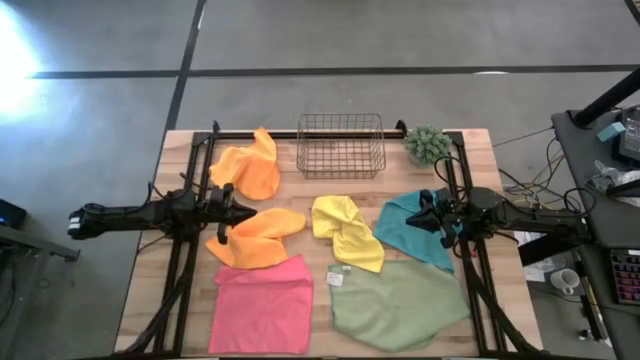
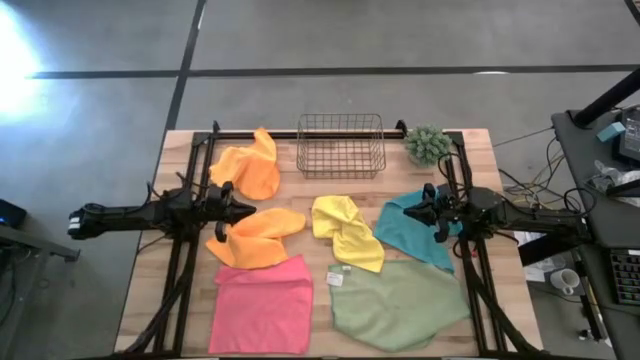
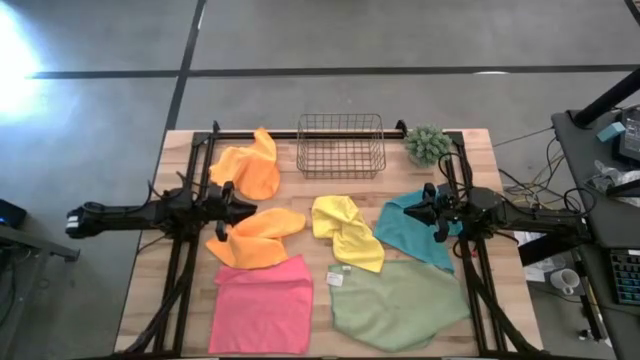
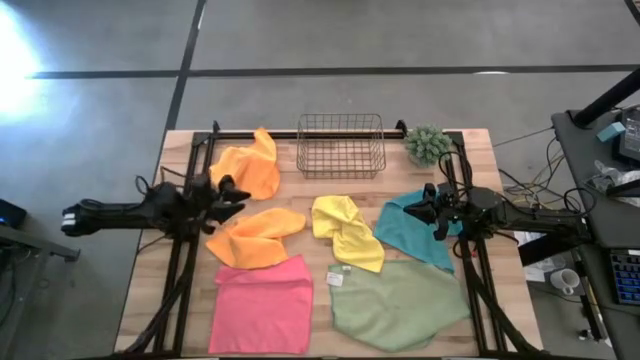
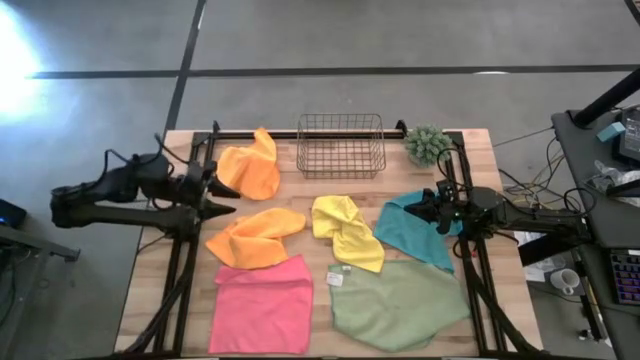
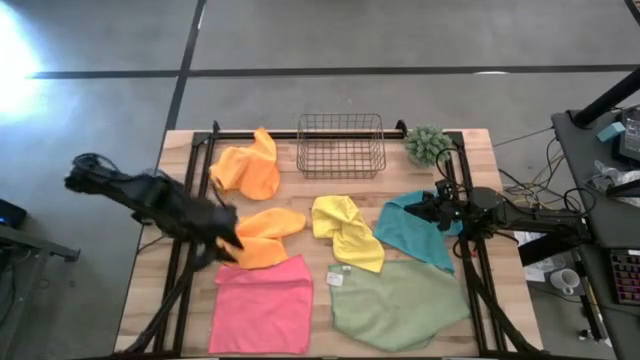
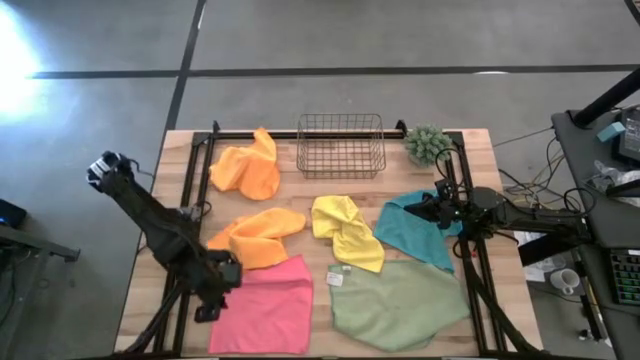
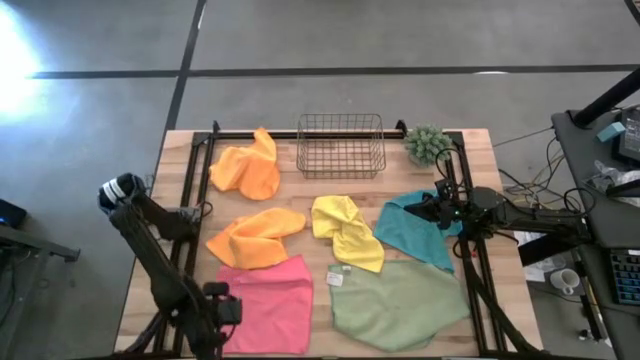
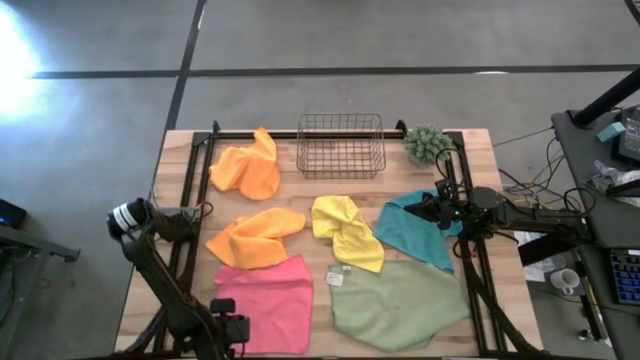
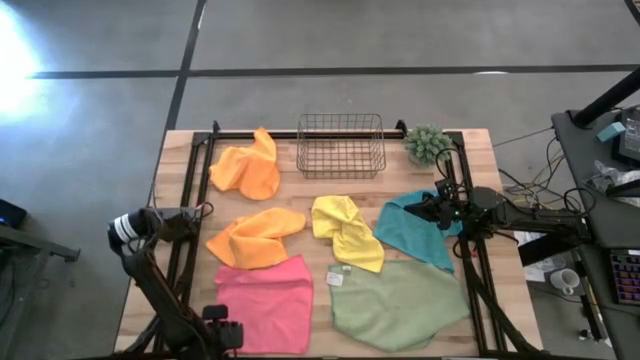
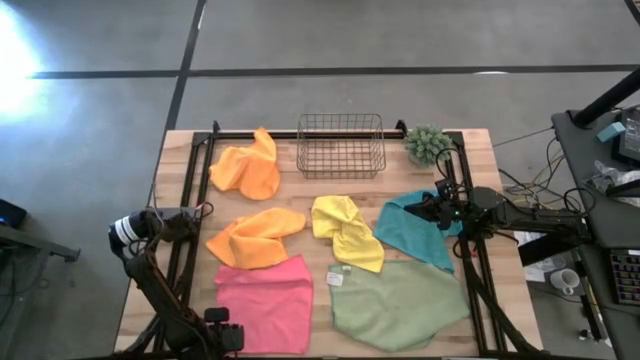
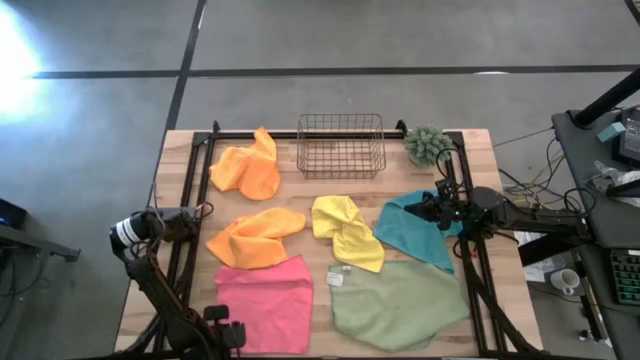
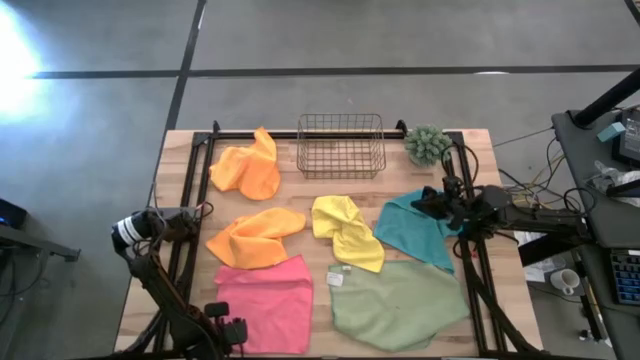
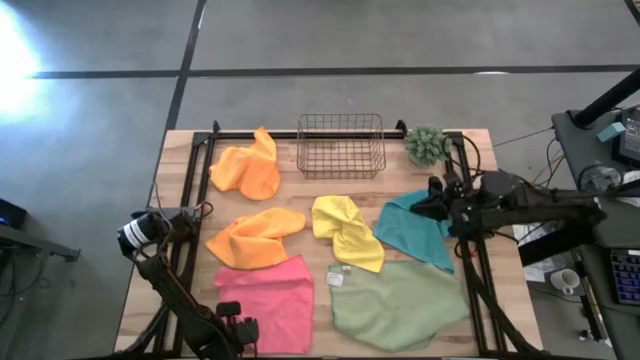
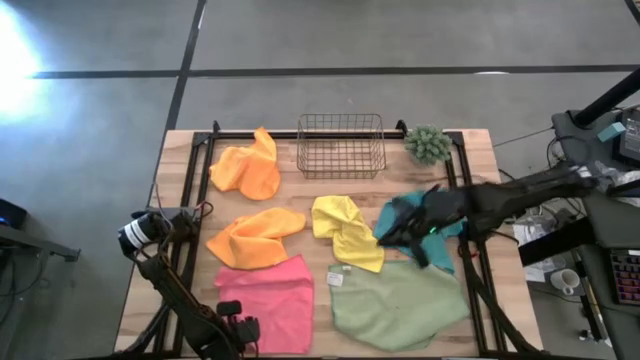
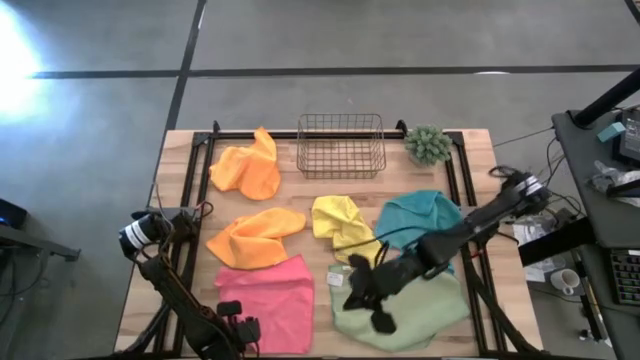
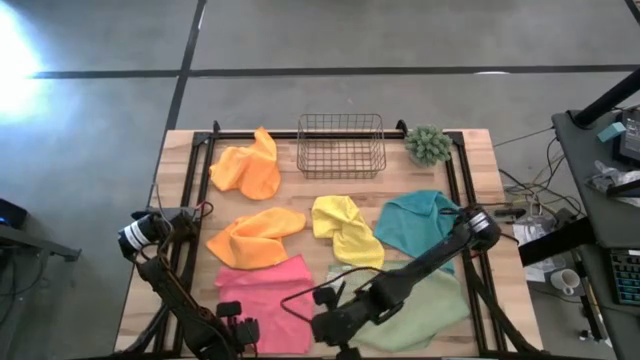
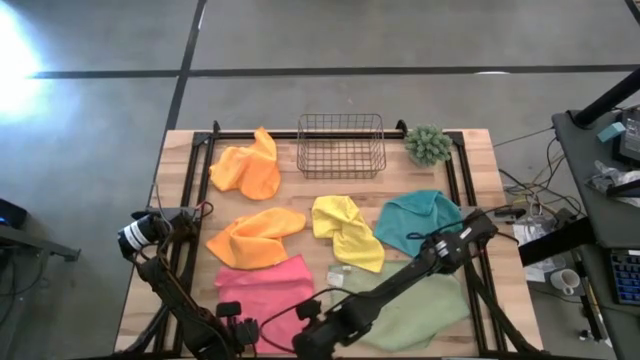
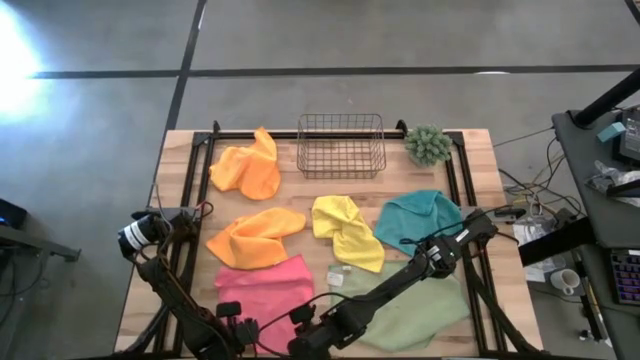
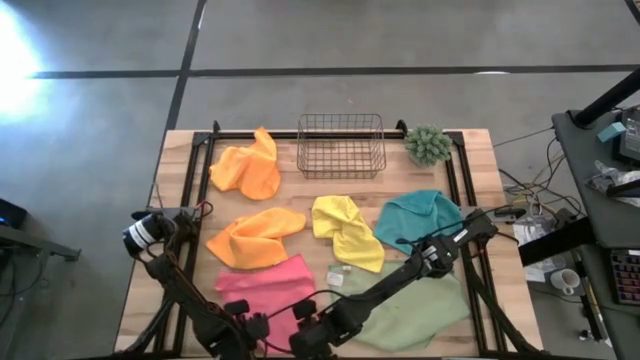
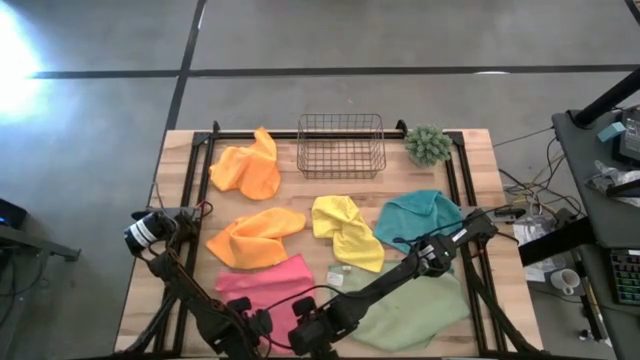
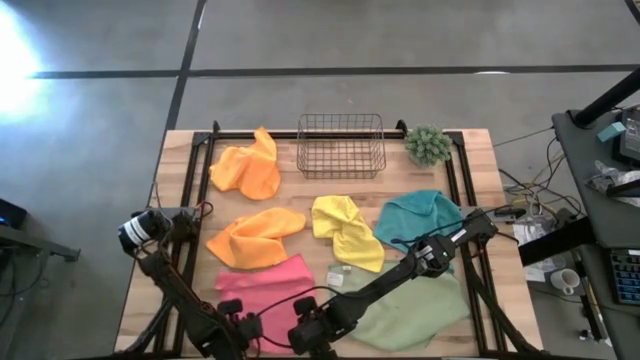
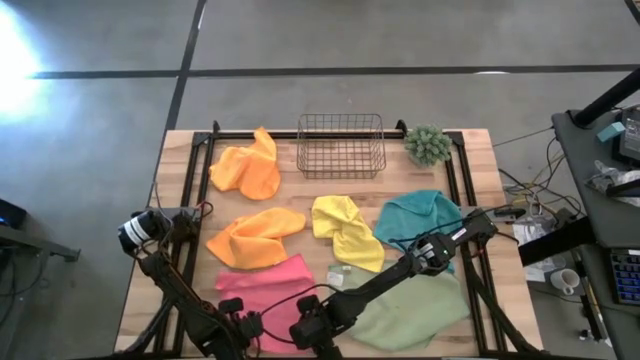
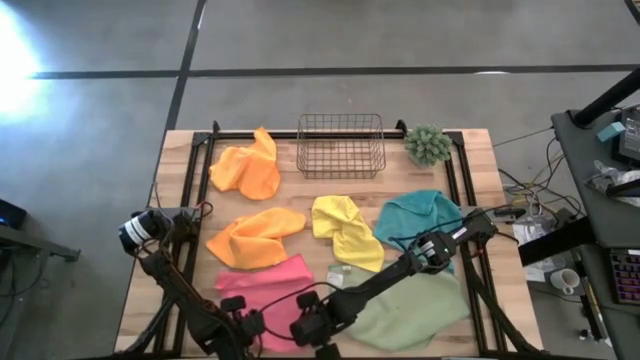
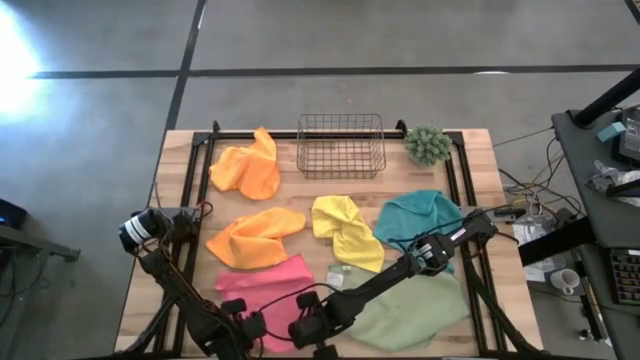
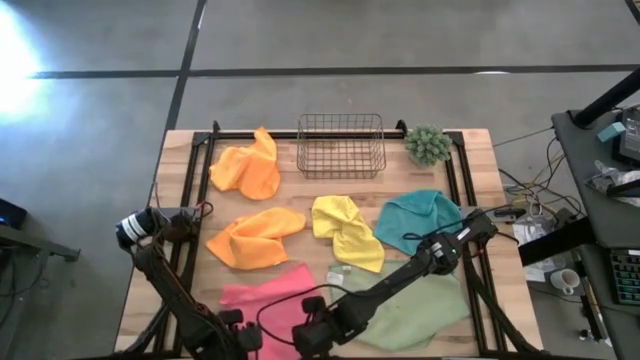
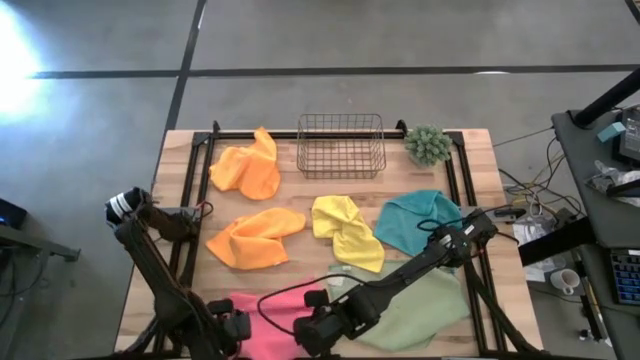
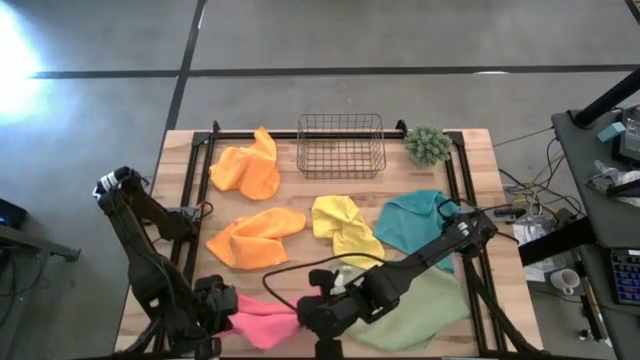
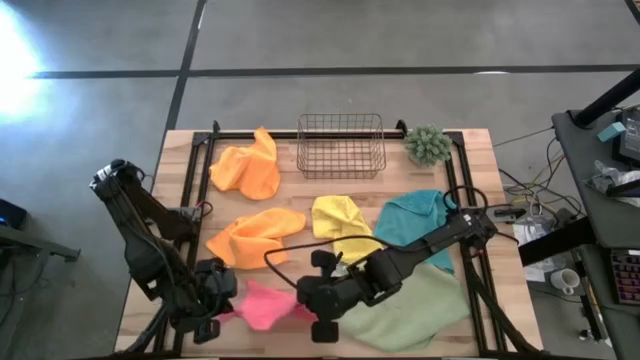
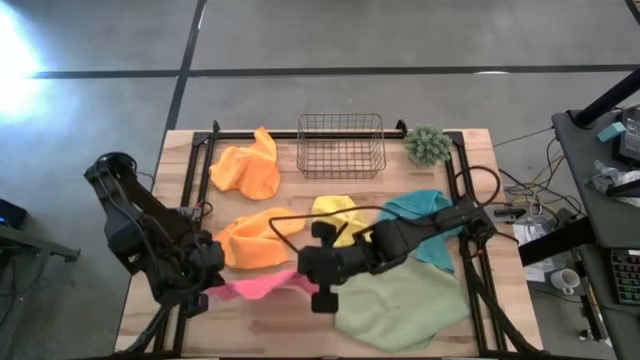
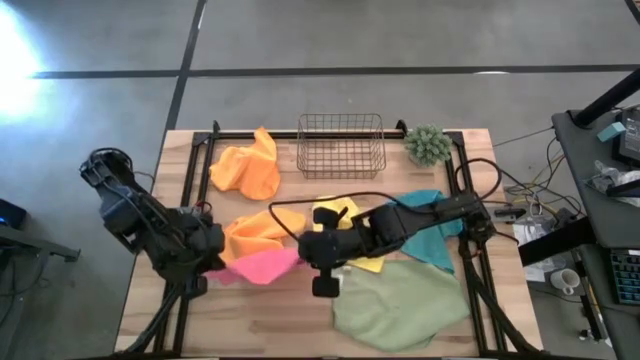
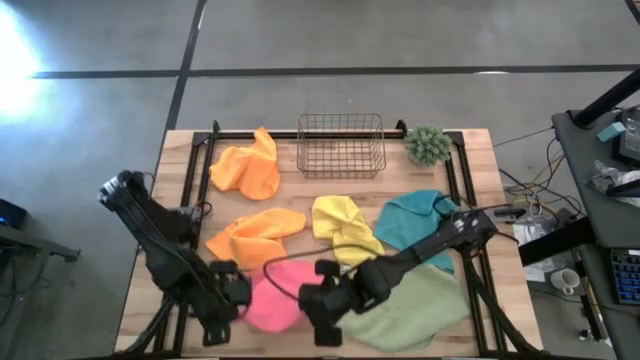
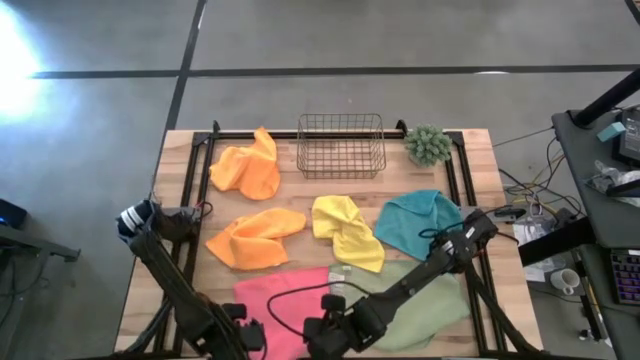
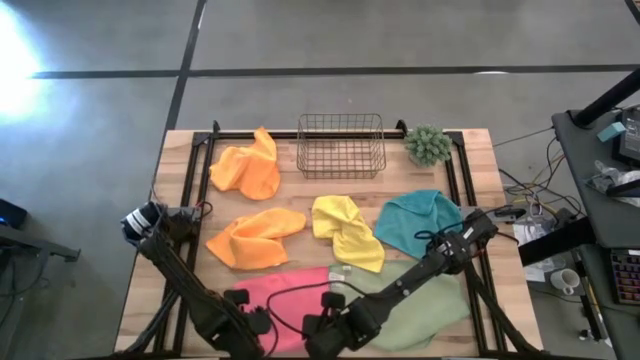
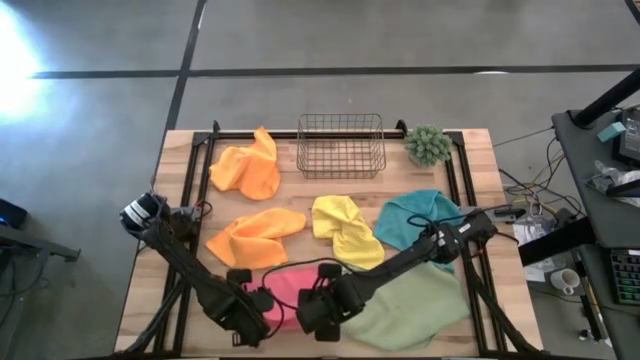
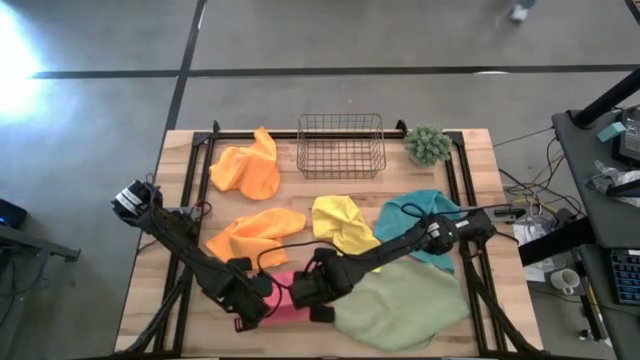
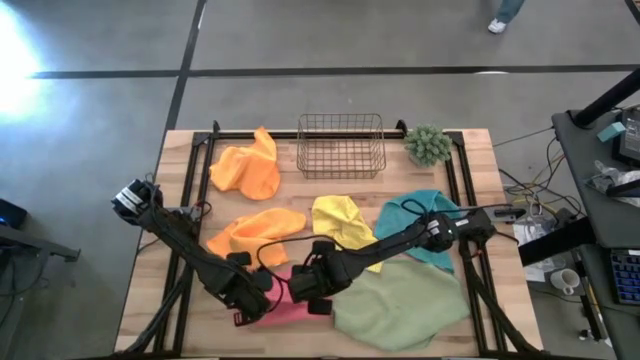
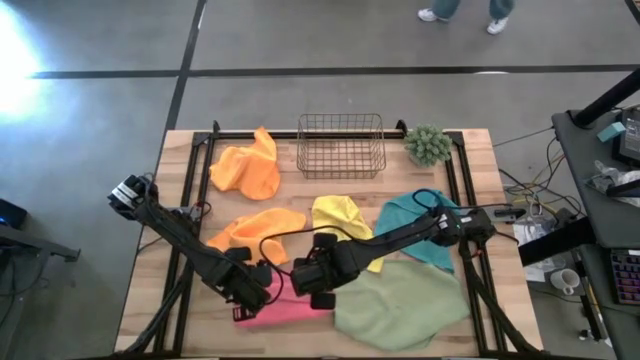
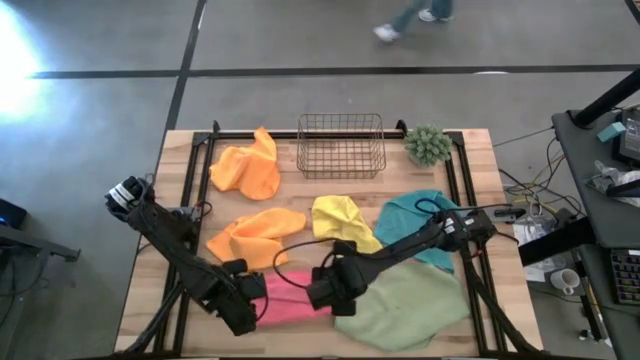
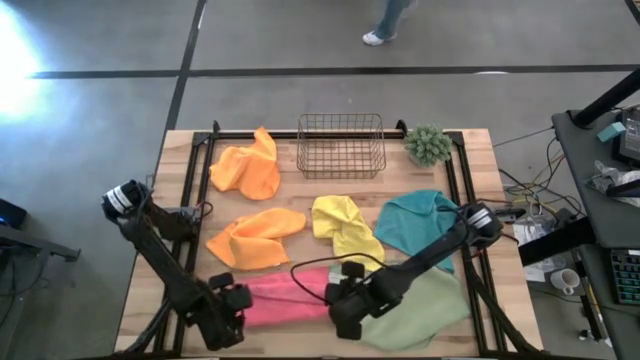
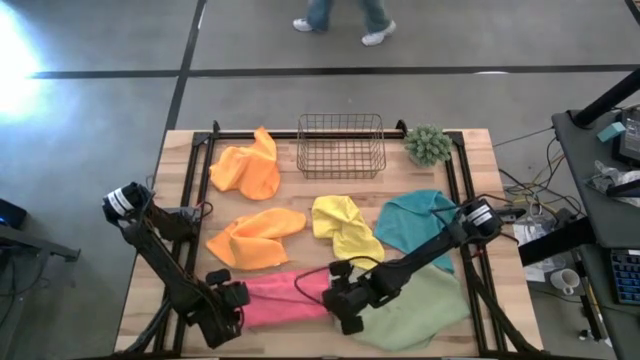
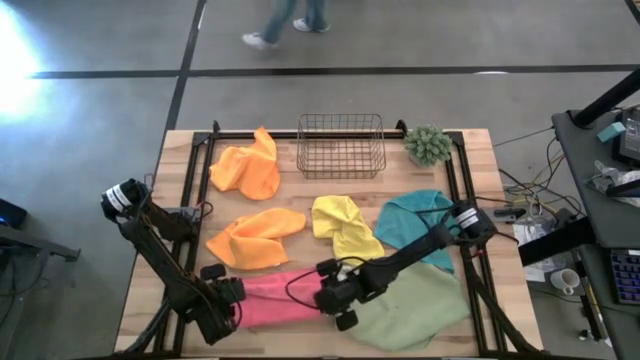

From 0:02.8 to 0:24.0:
Task: Fold microfiber towels
Fold the pink microfiber cloth
